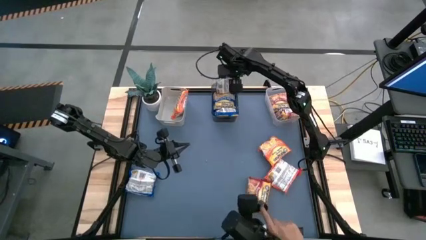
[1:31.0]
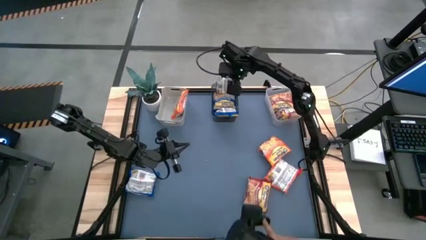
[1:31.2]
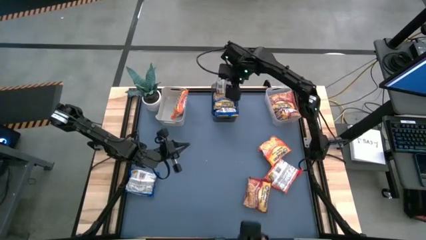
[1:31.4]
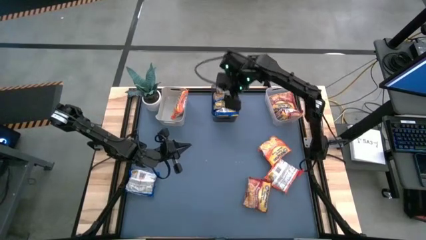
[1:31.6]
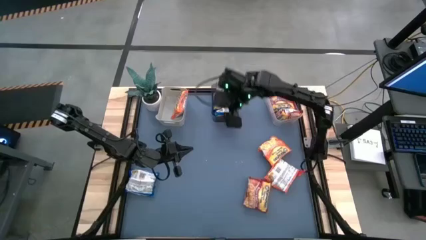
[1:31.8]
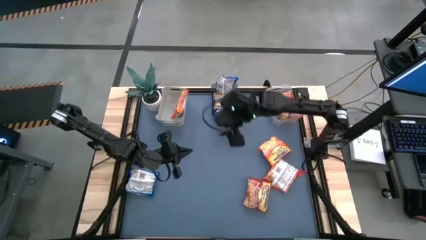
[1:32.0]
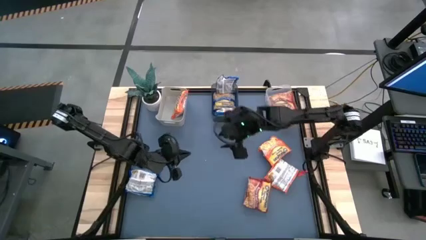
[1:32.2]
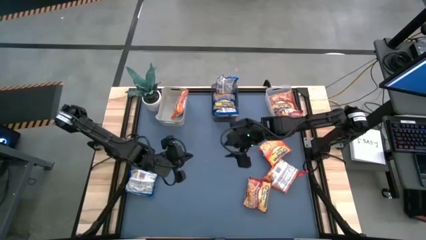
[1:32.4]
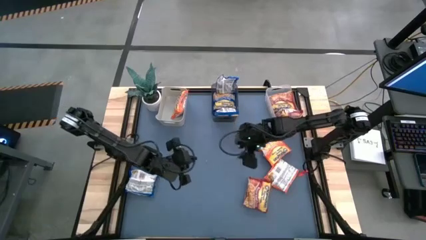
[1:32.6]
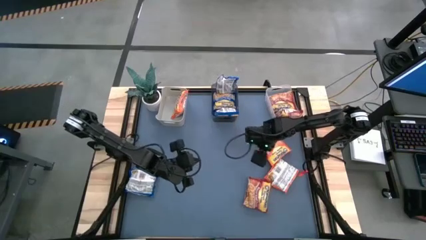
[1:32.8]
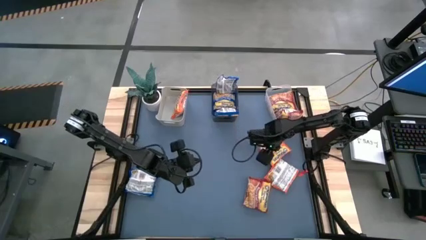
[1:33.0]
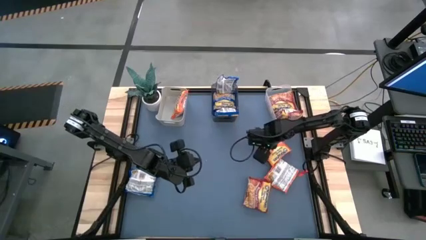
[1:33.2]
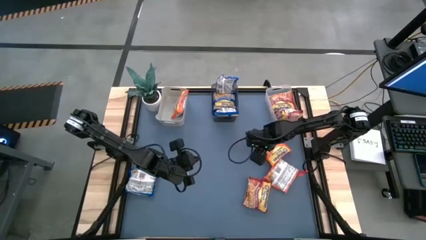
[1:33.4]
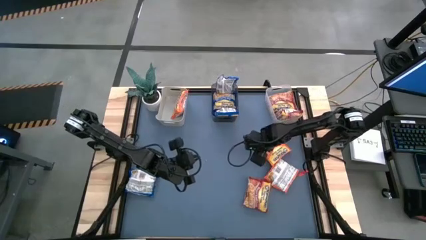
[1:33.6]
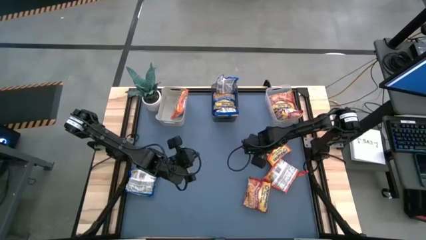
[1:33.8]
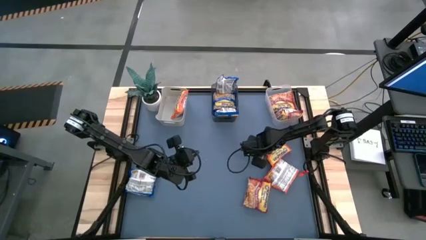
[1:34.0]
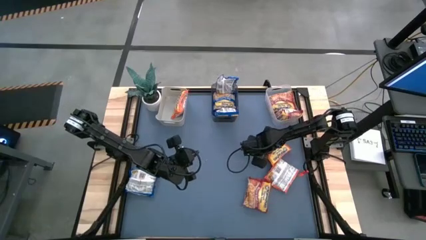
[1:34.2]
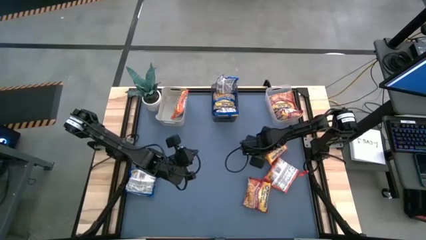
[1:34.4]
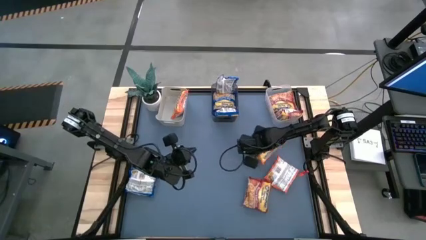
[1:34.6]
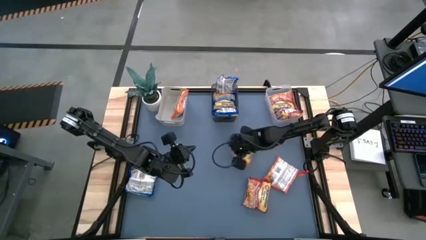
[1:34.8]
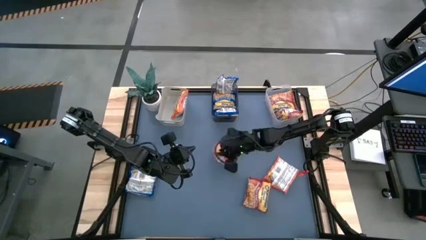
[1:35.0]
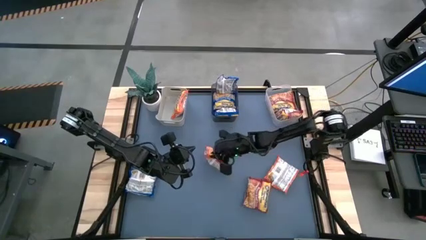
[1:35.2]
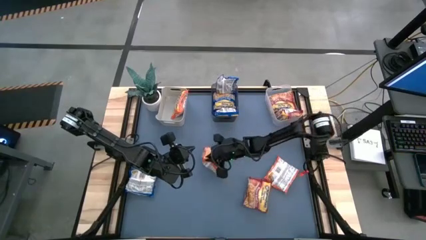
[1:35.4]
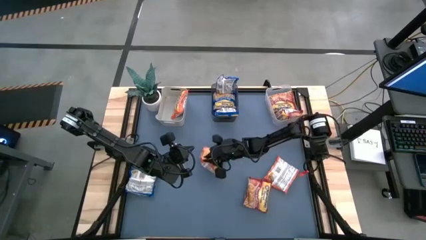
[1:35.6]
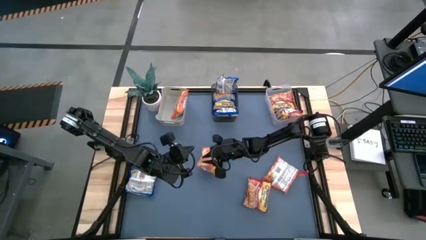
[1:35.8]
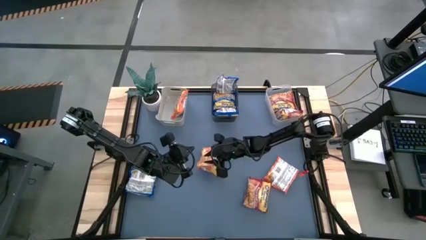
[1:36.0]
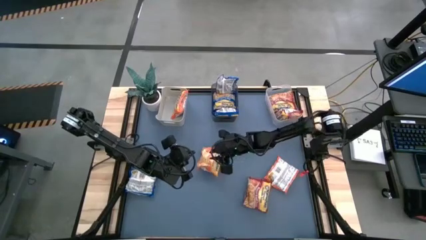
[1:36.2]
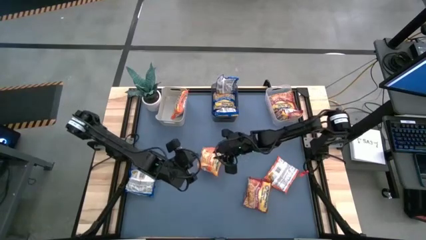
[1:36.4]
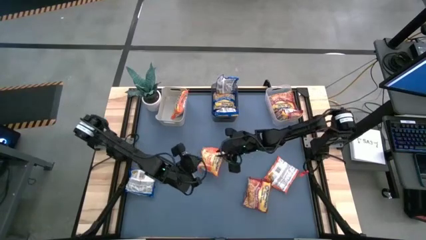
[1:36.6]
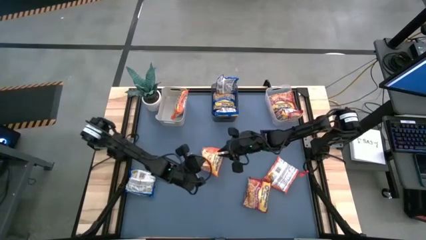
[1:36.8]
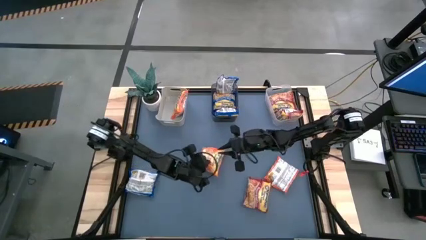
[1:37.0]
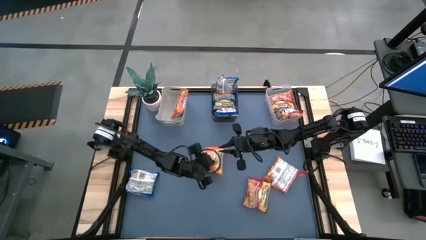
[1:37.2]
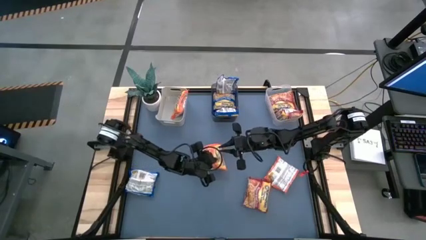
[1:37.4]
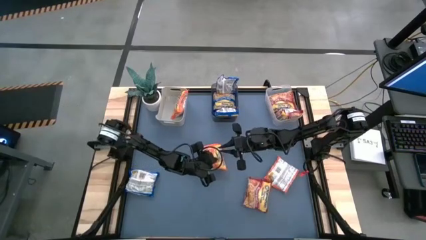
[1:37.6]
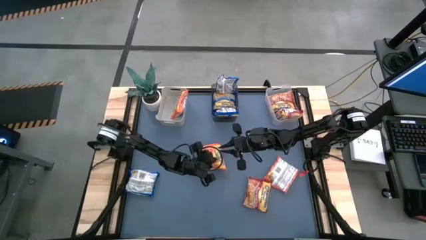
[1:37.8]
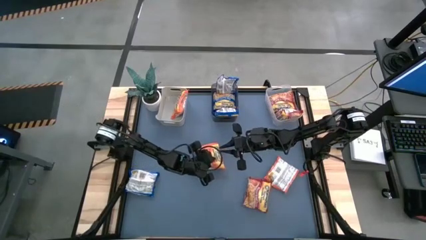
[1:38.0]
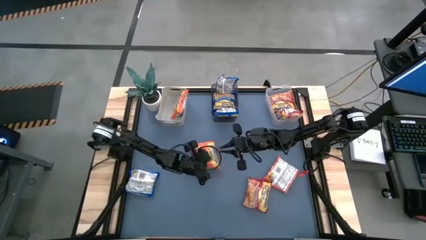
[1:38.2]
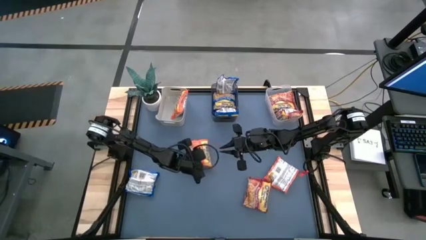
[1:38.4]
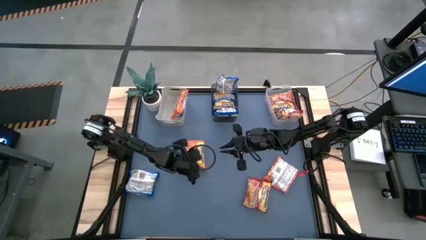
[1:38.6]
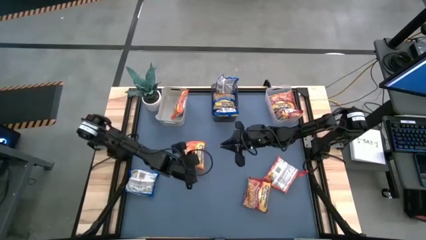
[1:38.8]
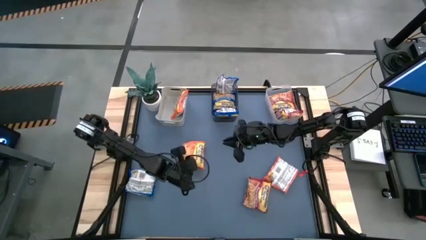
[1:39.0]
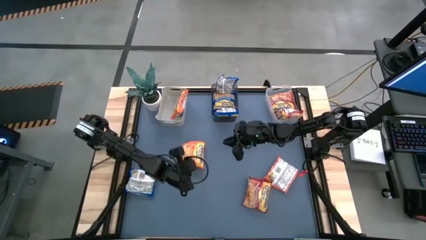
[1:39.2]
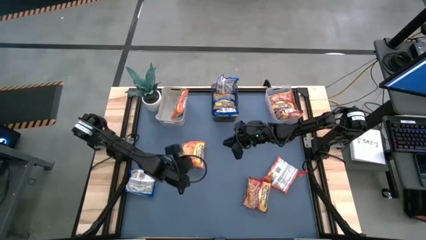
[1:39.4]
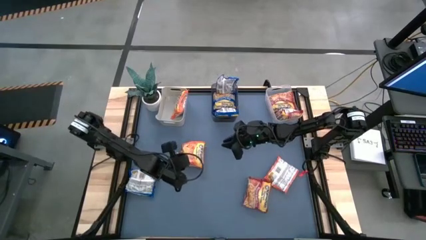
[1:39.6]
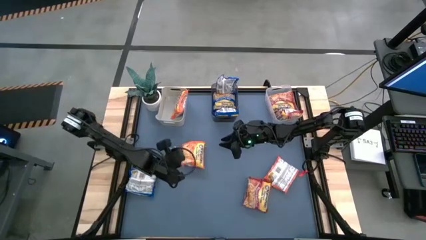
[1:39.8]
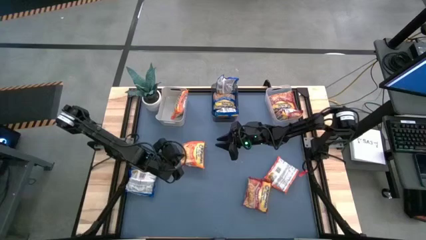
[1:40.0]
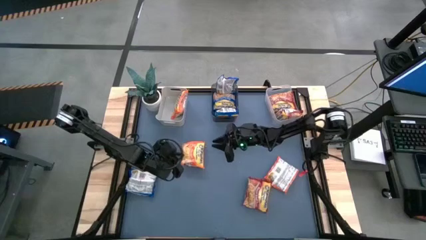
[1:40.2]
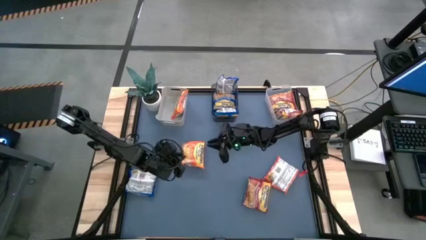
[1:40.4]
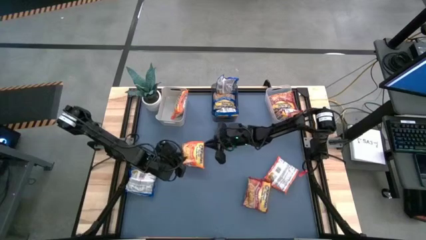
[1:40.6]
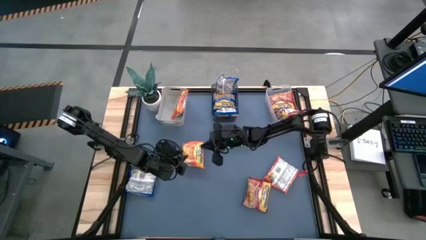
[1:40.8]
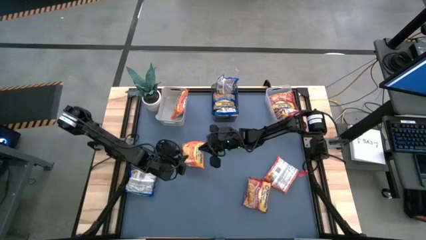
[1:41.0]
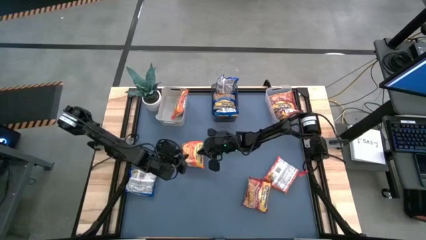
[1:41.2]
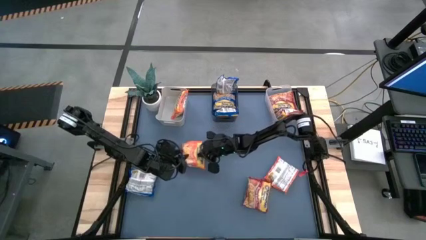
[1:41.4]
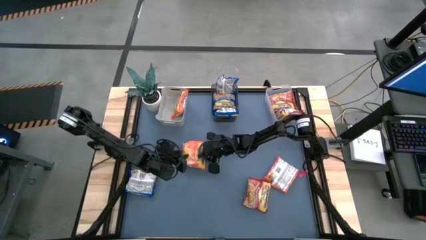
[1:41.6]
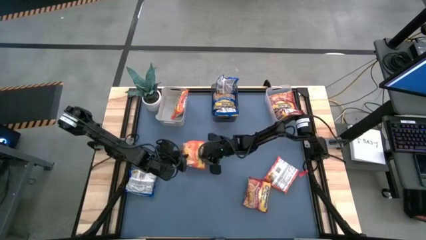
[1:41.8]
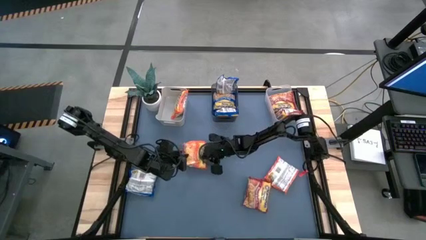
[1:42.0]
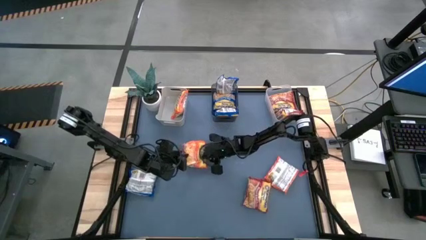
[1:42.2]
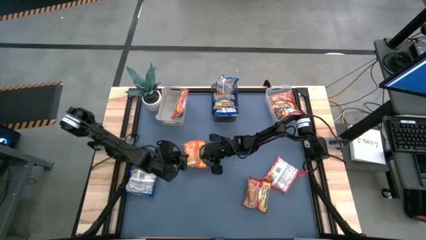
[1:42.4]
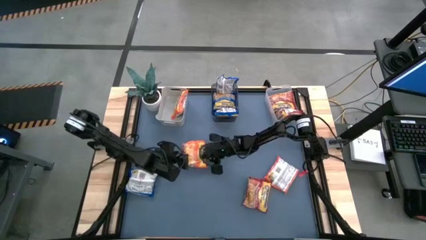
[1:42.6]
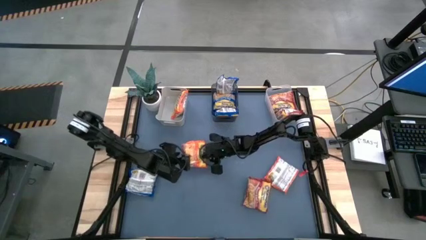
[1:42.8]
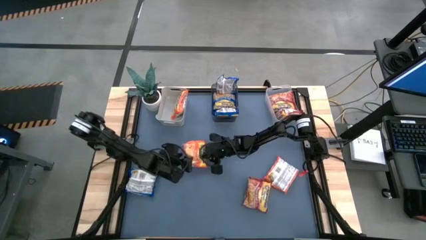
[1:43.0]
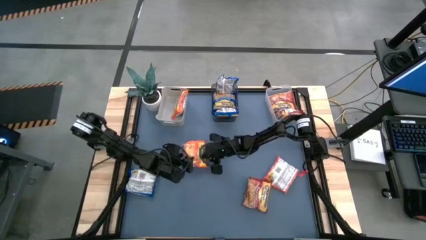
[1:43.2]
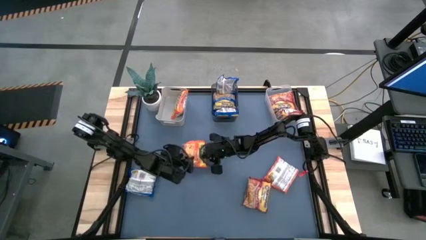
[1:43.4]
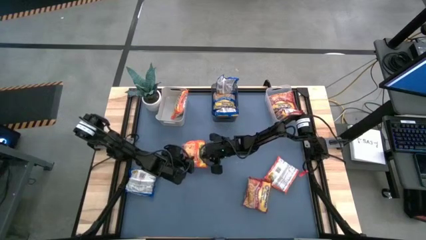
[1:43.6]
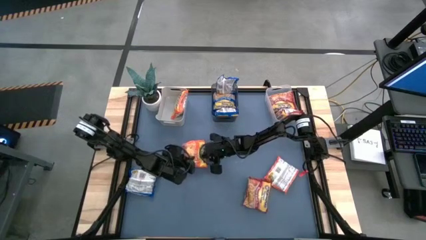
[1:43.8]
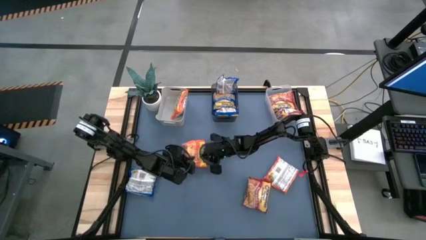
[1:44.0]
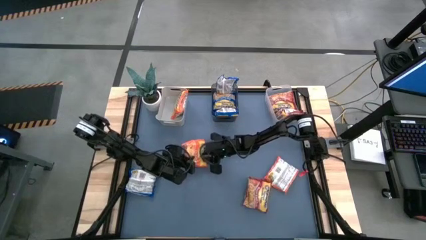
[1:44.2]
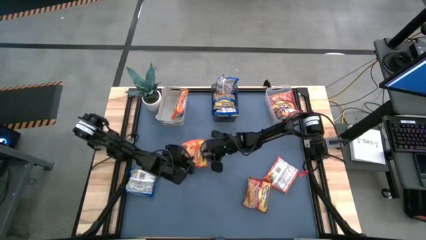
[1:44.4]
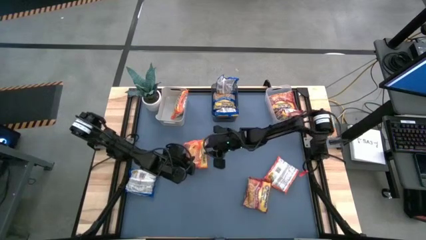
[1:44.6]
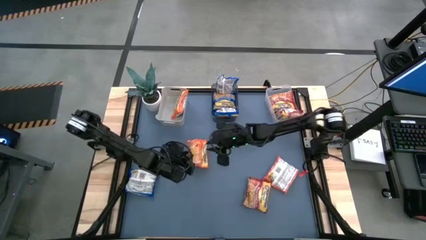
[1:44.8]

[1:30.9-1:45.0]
Task: Sort Maruchan noodles
Put the orange pack noodle into the gray bin

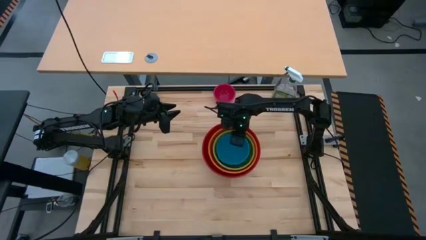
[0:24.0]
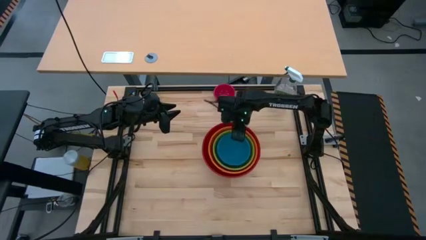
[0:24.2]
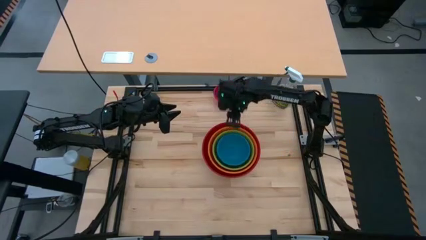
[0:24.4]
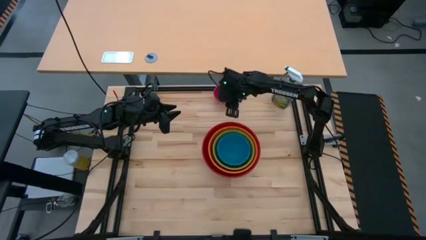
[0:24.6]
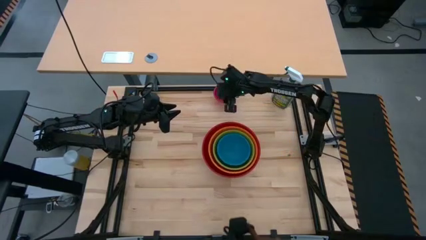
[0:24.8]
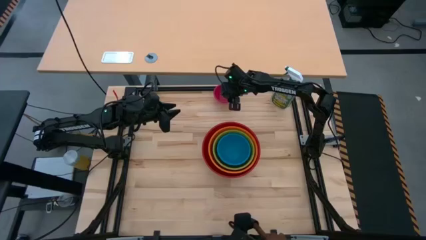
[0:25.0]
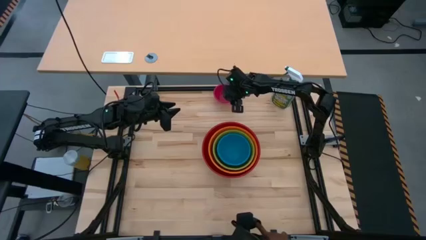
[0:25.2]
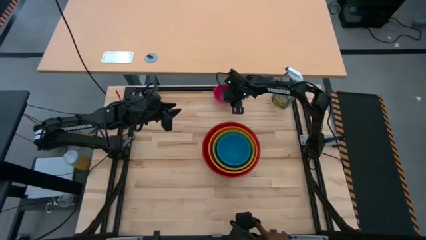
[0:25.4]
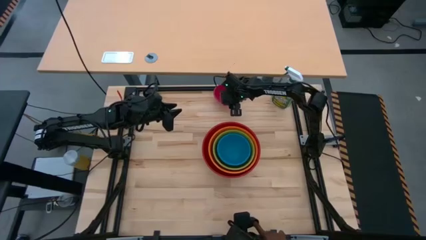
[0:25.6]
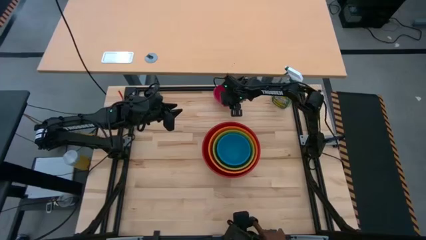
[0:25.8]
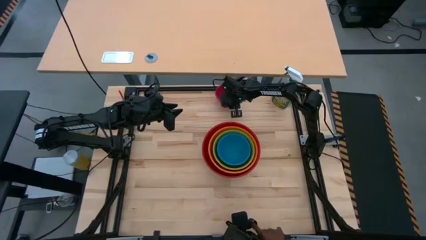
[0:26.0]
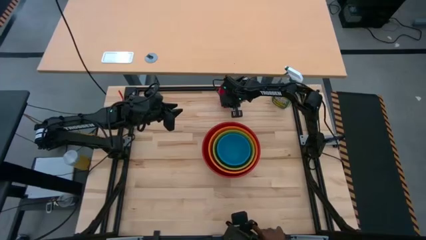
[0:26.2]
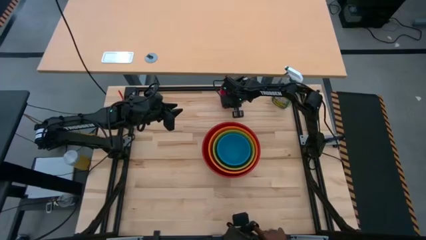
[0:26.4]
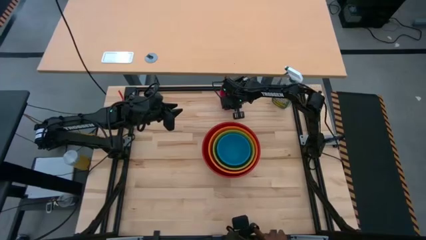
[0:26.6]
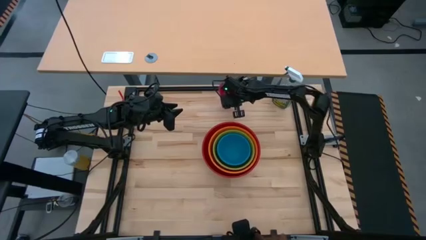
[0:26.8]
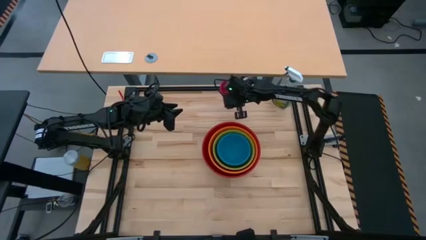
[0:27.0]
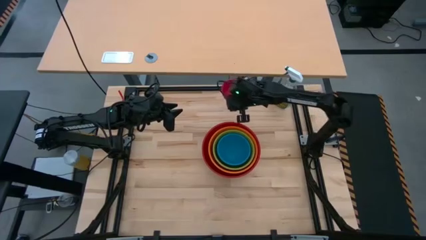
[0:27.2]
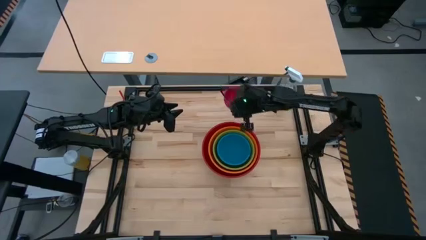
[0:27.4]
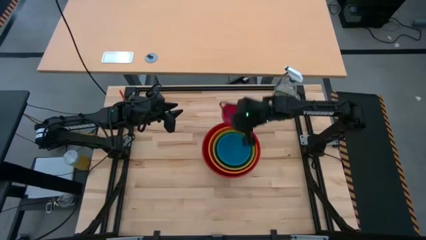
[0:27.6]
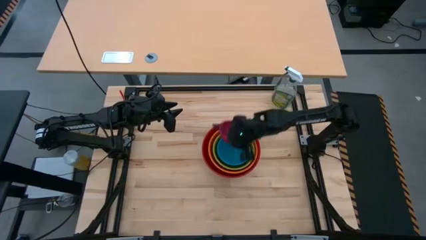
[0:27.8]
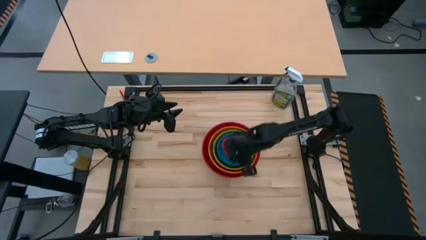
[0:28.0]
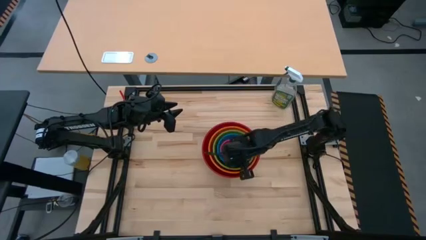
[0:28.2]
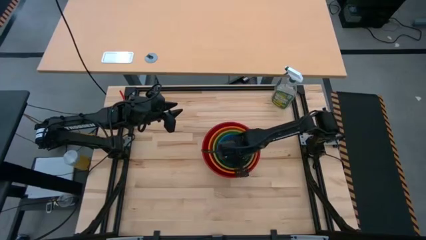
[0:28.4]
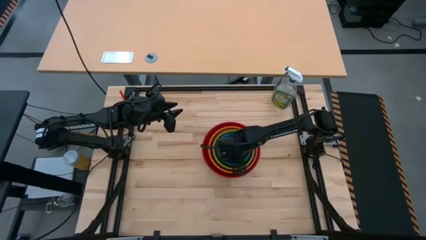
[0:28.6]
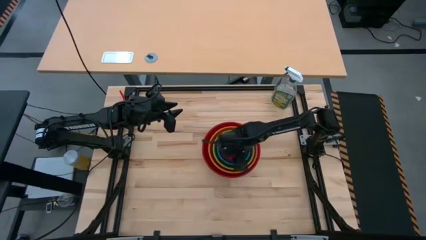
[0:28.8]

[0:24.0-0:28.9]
Task: Nest bowls inside each other by size order
Stack the pink bowl on top of the blue bowl
